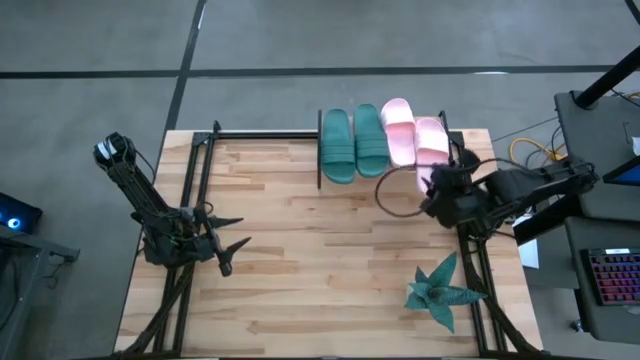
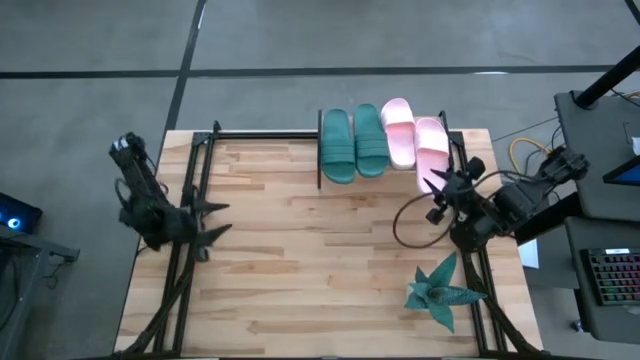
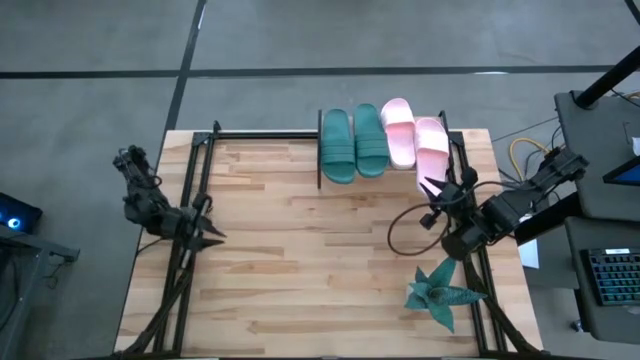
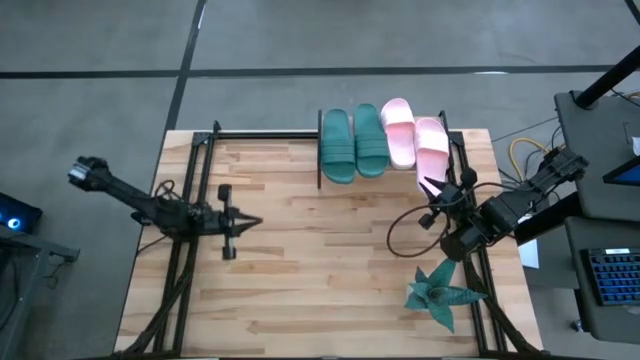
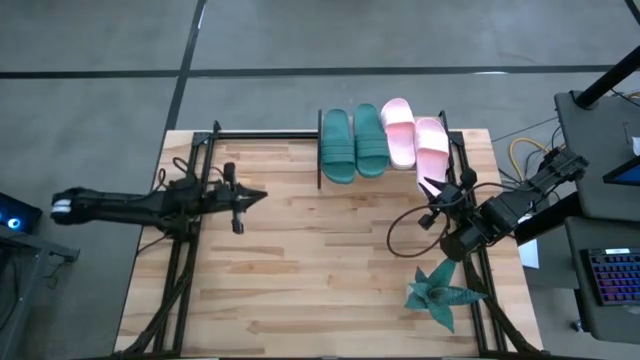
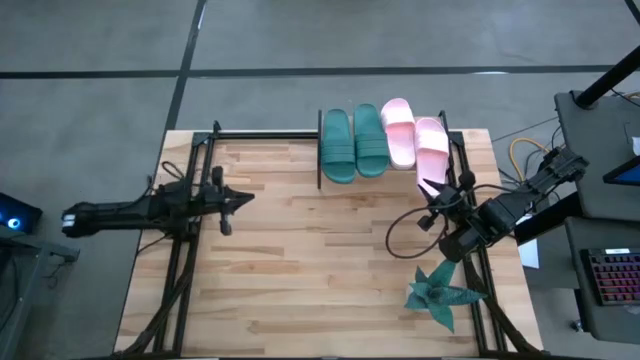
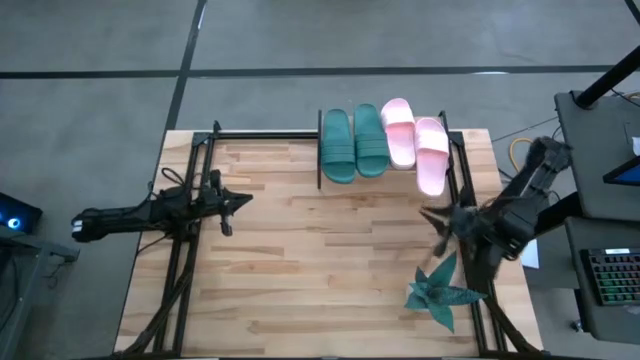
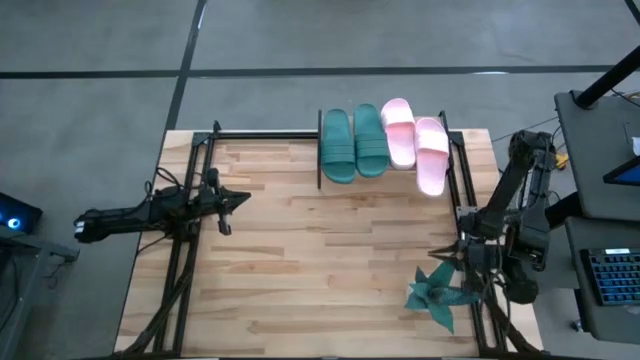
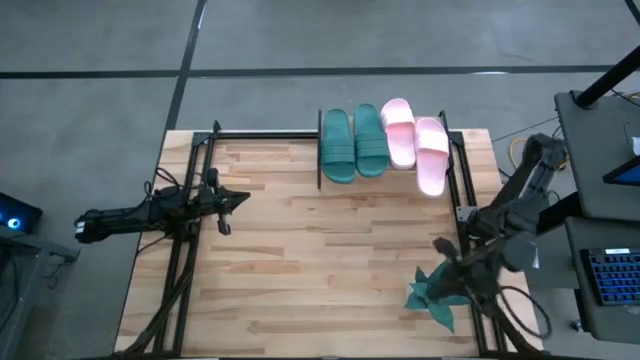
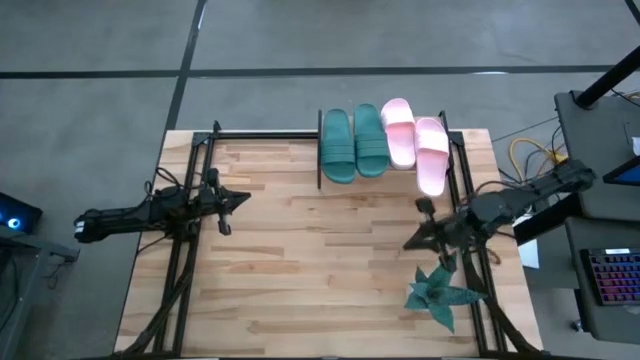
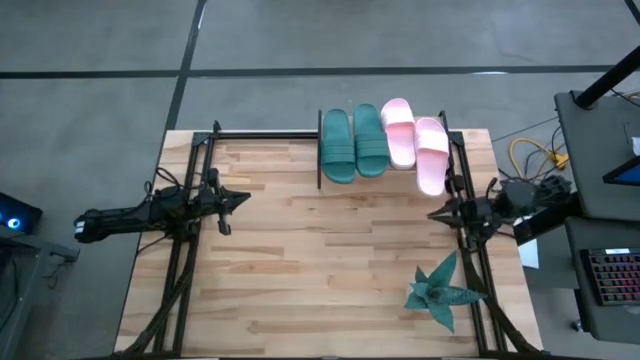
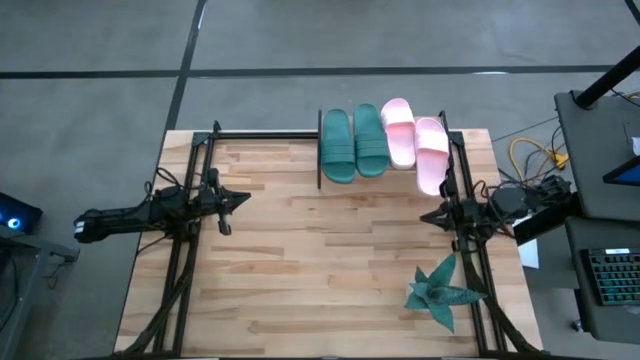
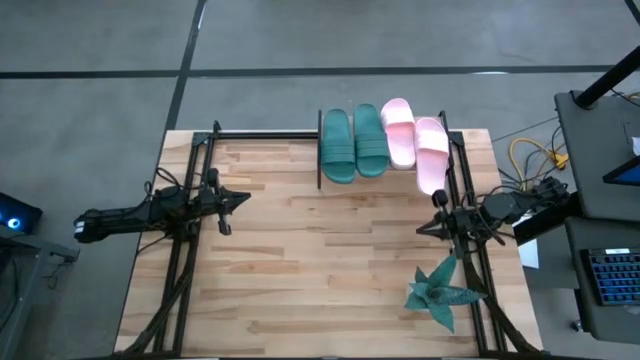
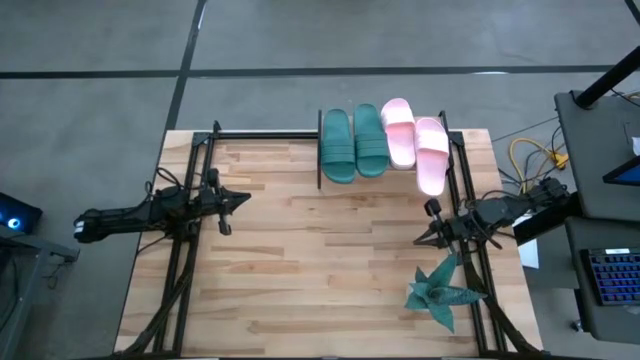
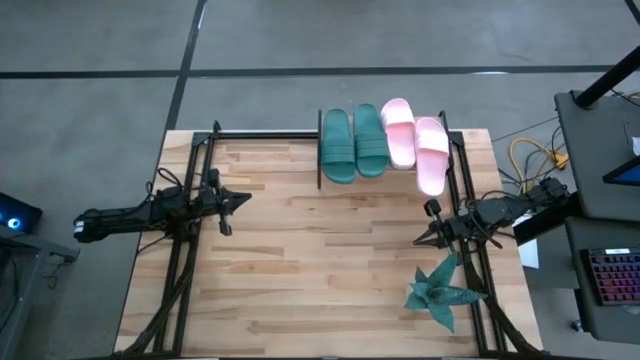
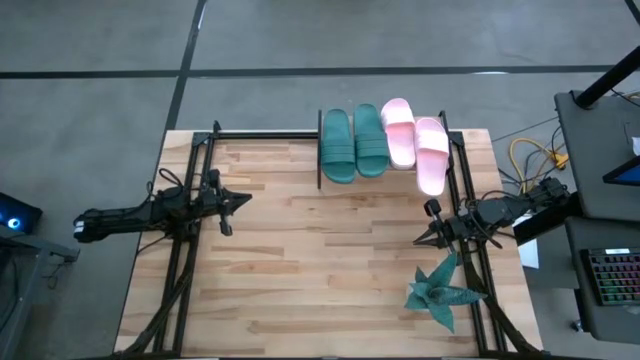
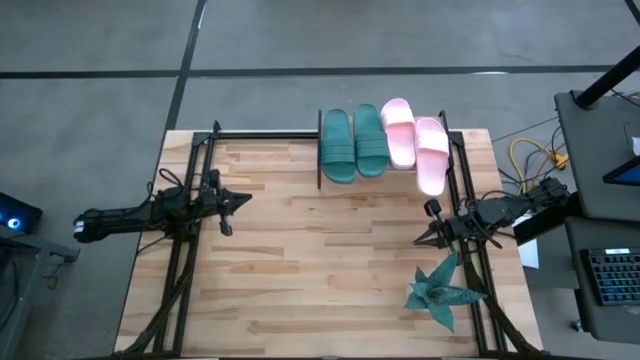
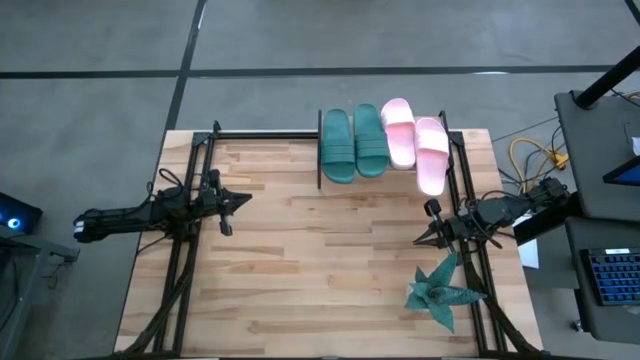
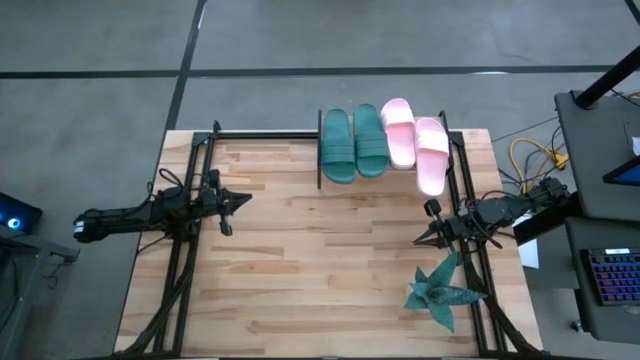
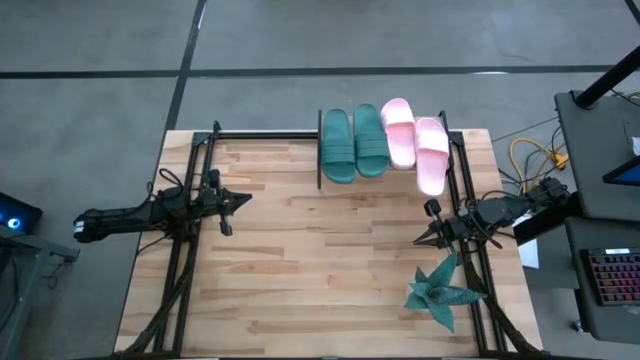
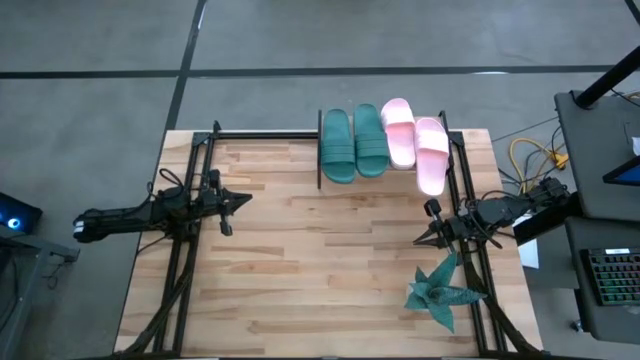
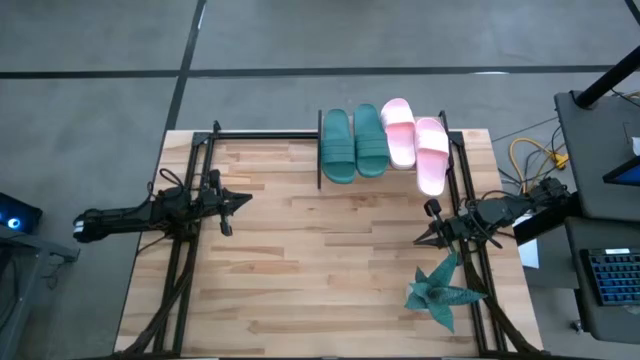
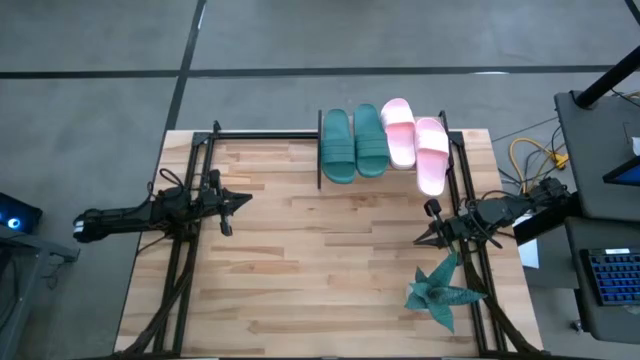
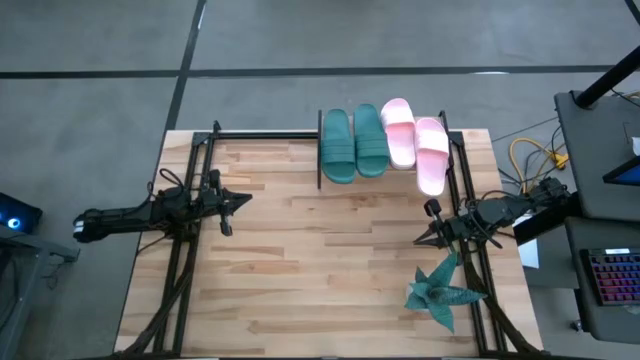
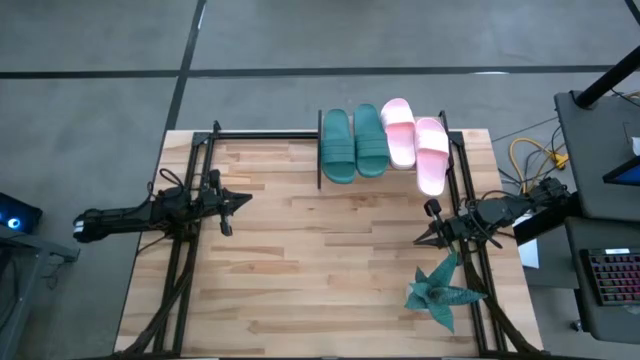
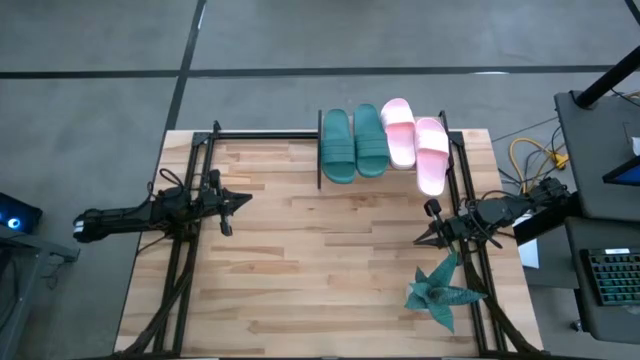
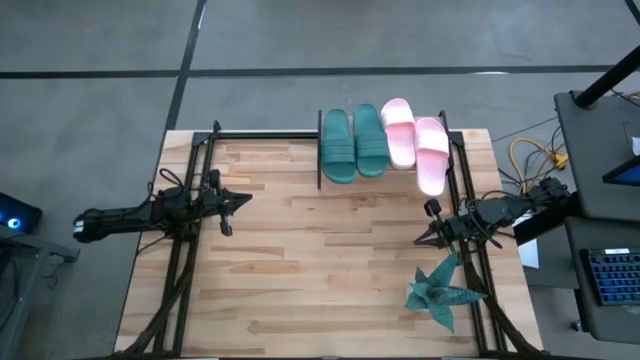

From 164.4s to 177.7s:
Task: Pick and place slides into the shelf
Return to Home Position

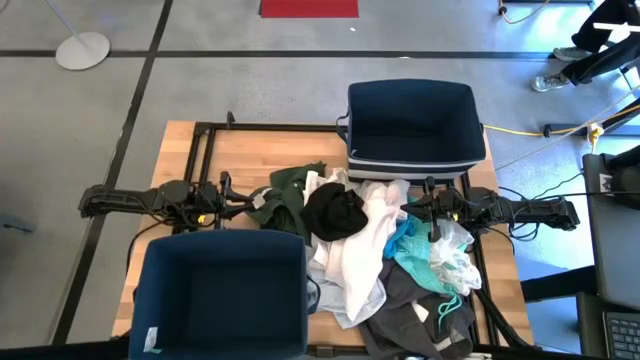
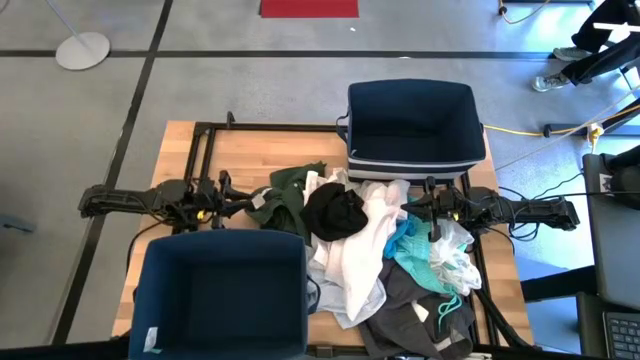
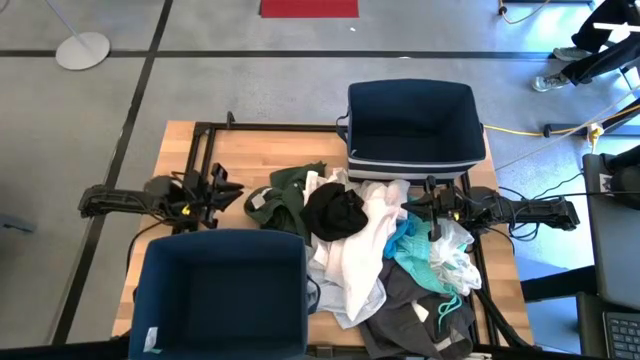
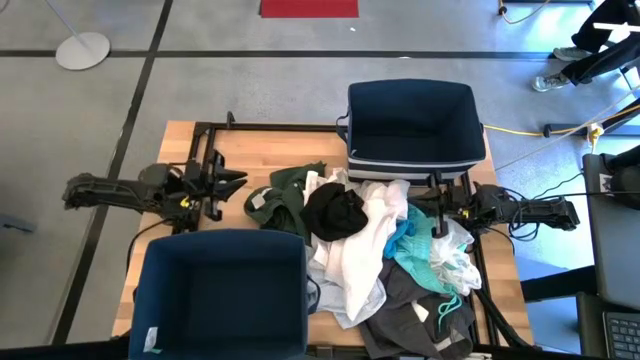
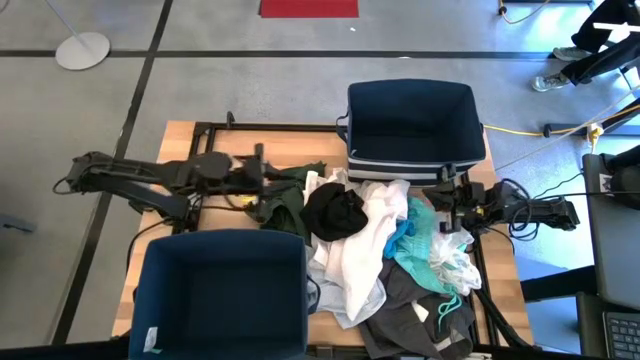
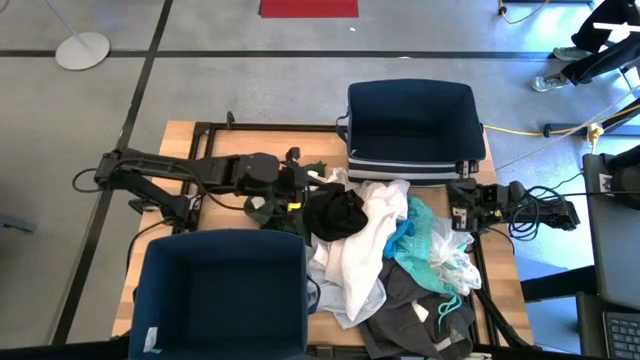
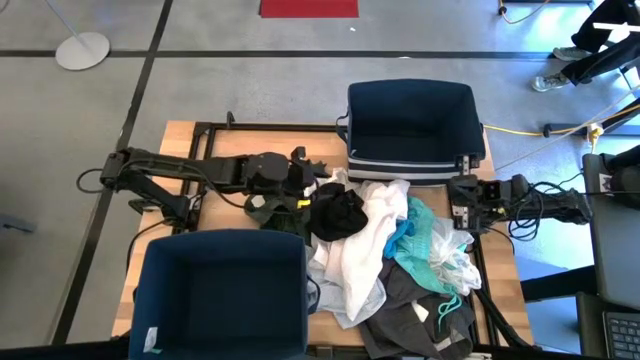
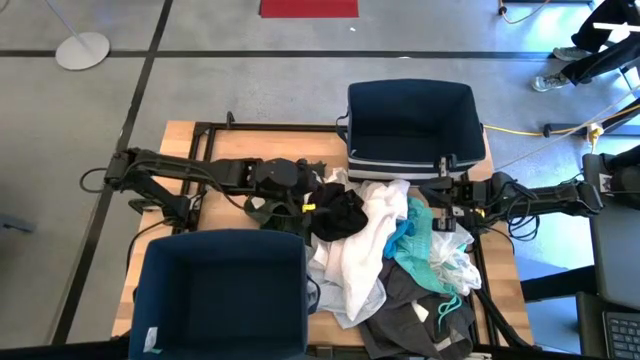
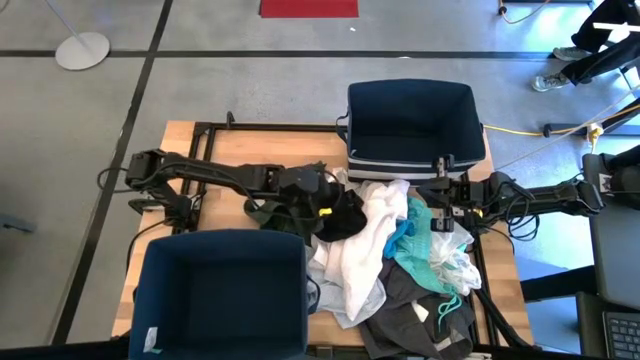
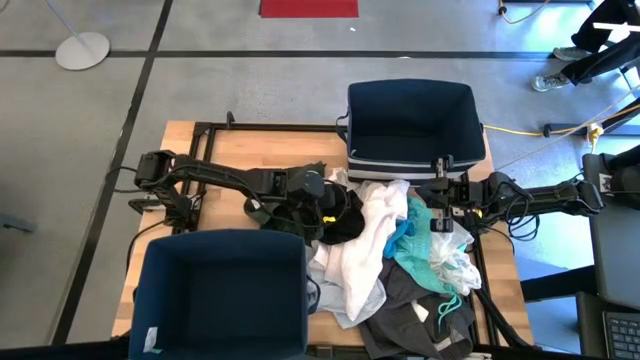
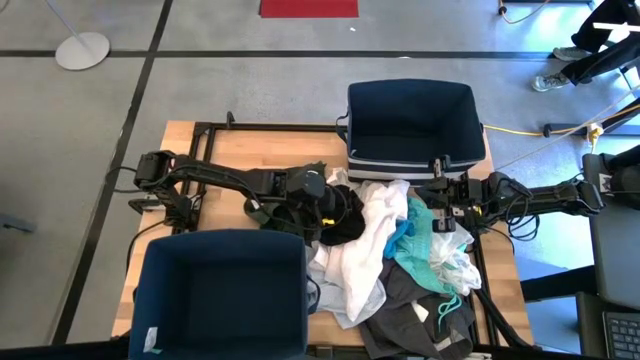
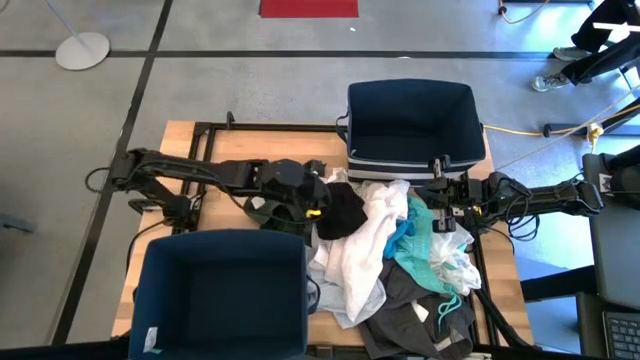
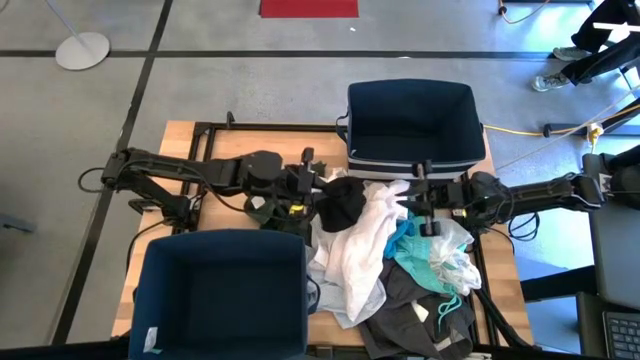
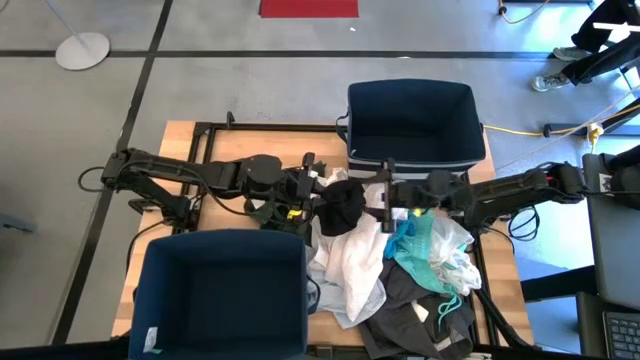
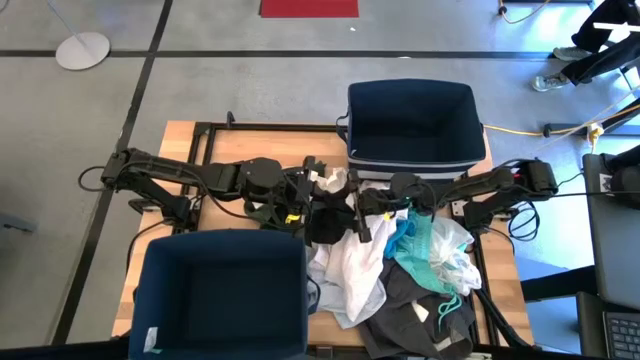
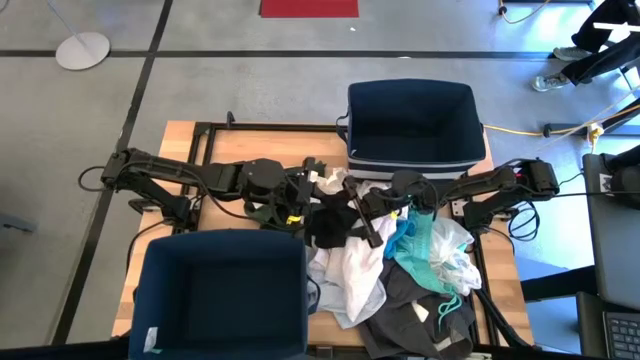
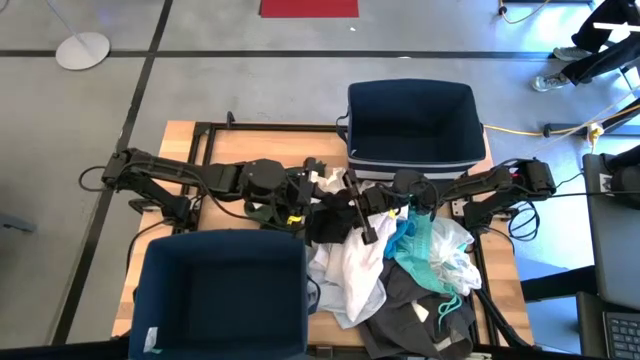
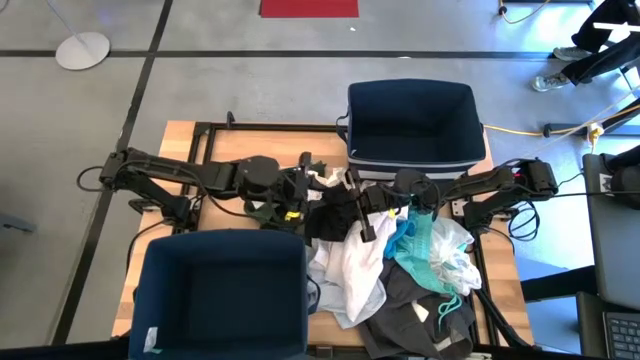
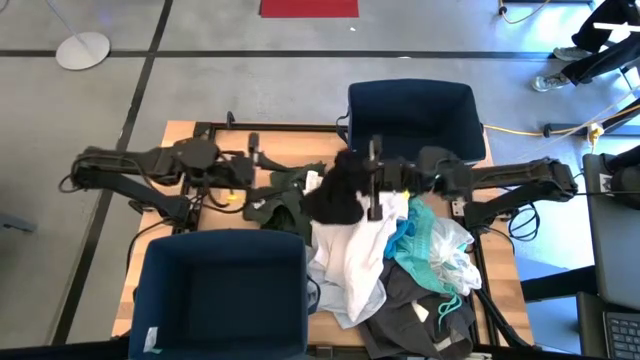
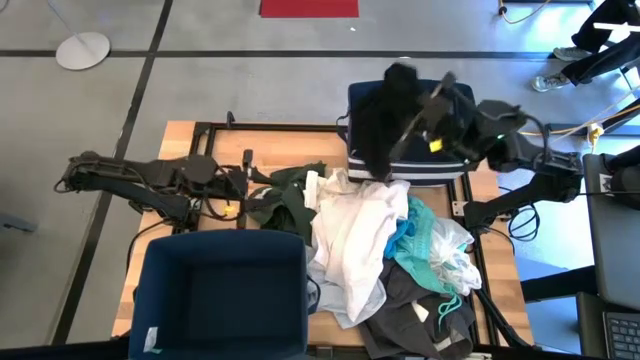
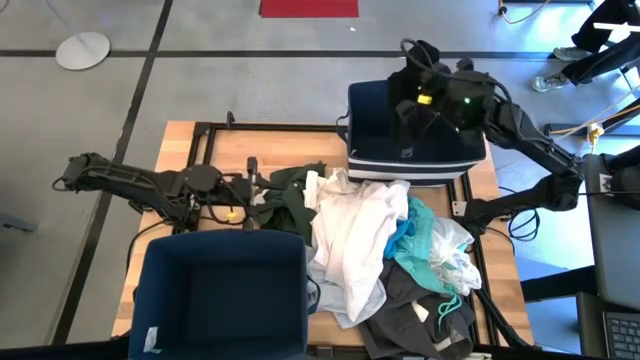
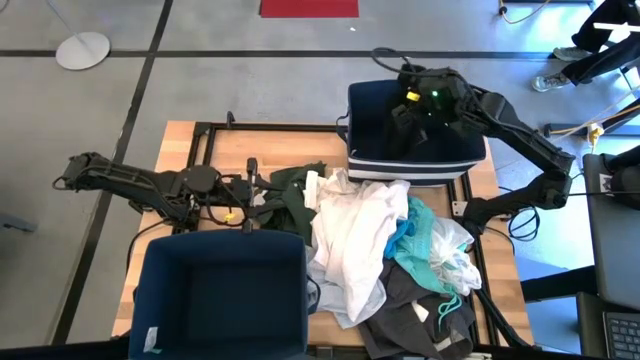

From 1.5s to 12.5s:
Task: Sort clothes
Put the black boxer into the top laundry bin
